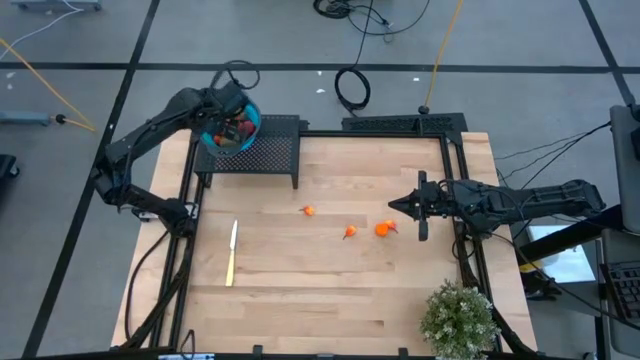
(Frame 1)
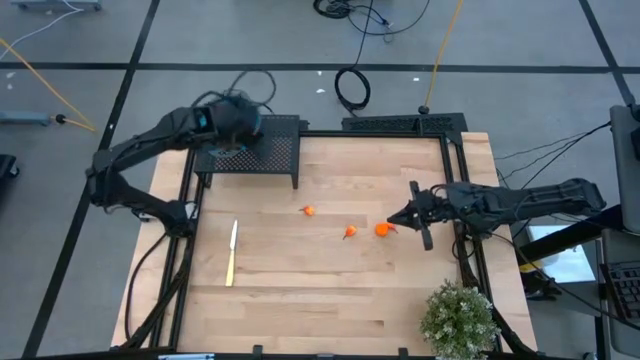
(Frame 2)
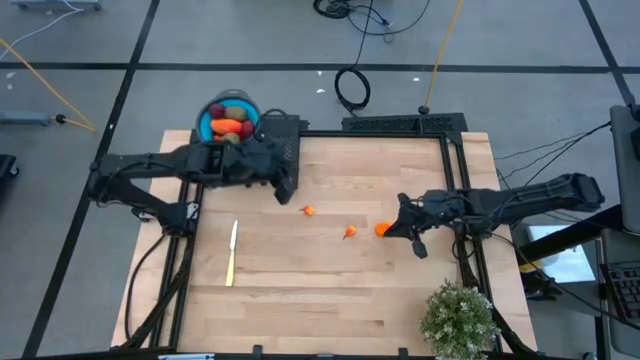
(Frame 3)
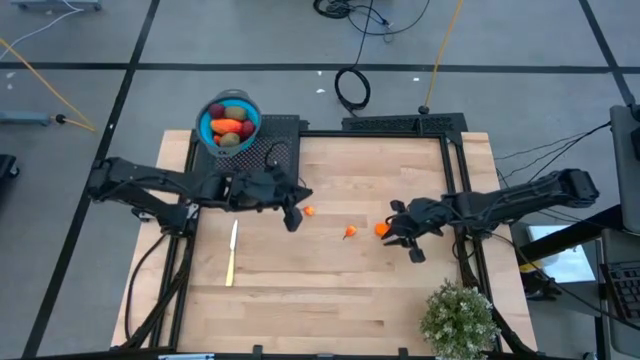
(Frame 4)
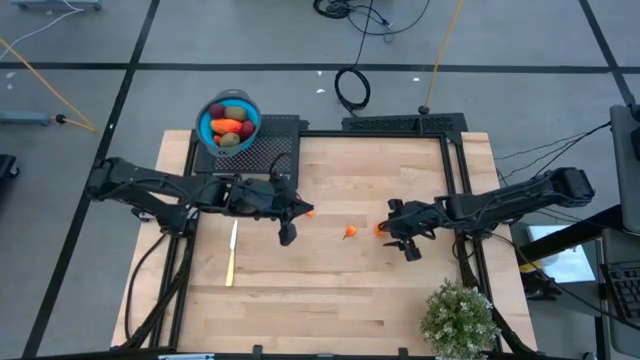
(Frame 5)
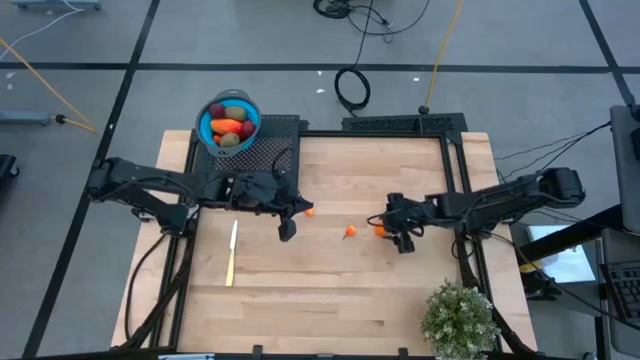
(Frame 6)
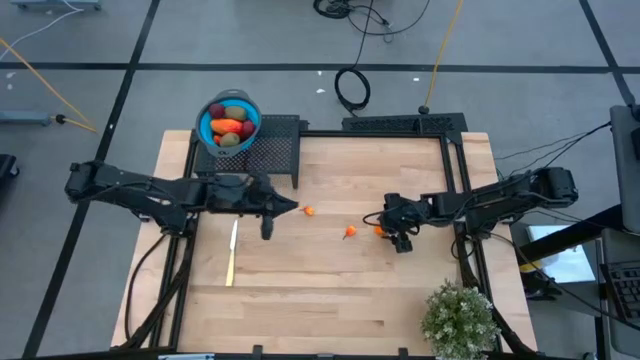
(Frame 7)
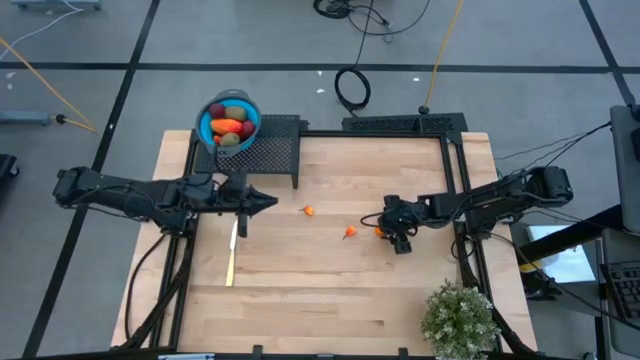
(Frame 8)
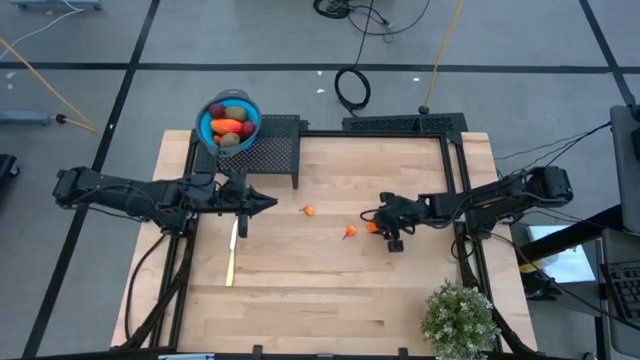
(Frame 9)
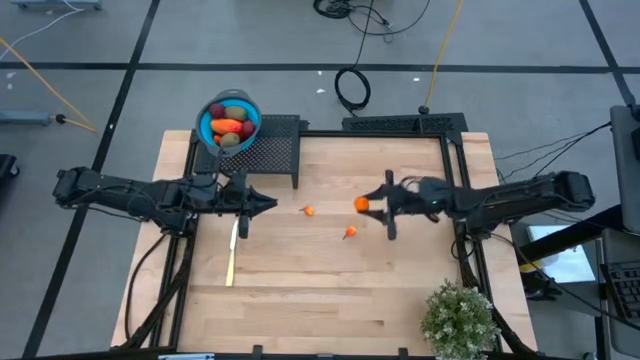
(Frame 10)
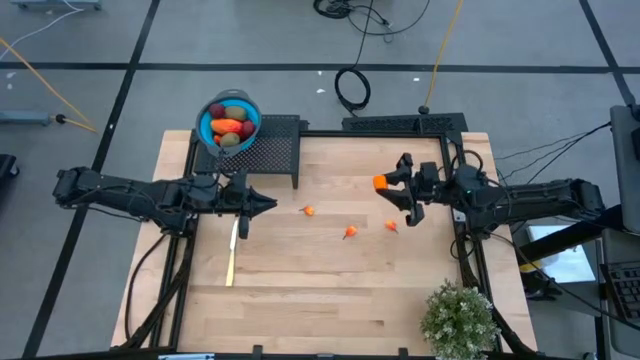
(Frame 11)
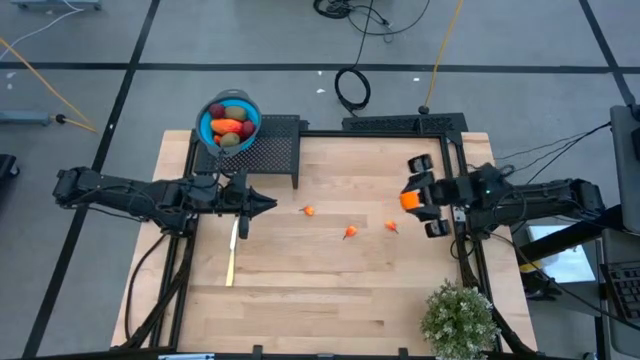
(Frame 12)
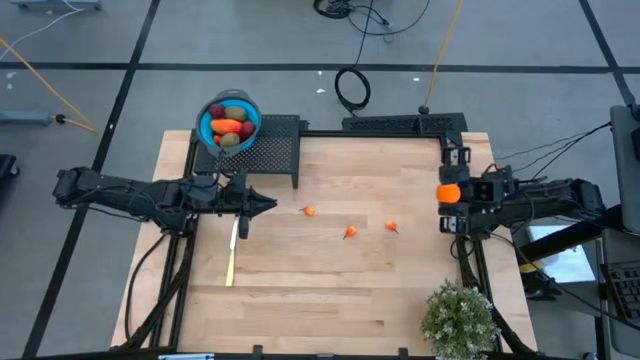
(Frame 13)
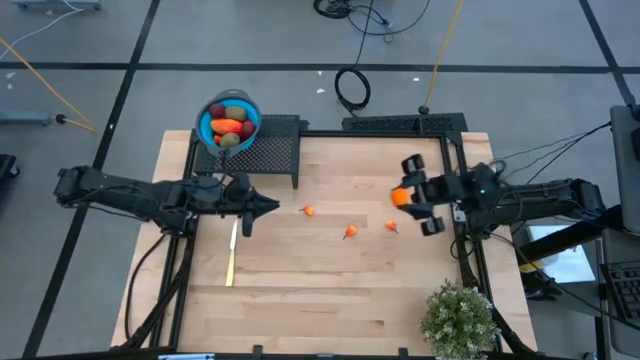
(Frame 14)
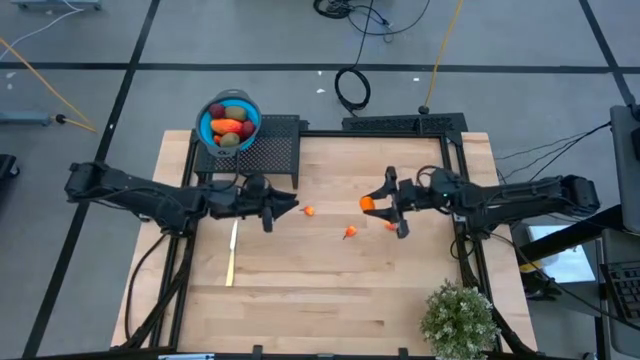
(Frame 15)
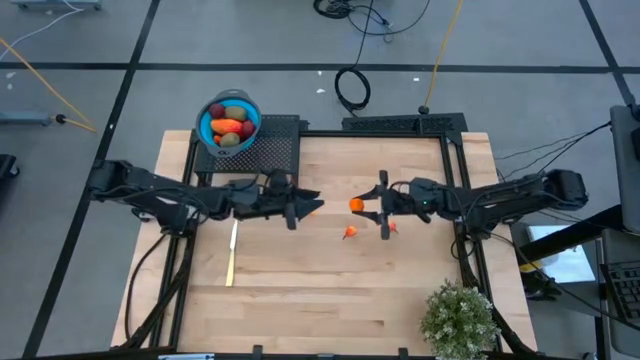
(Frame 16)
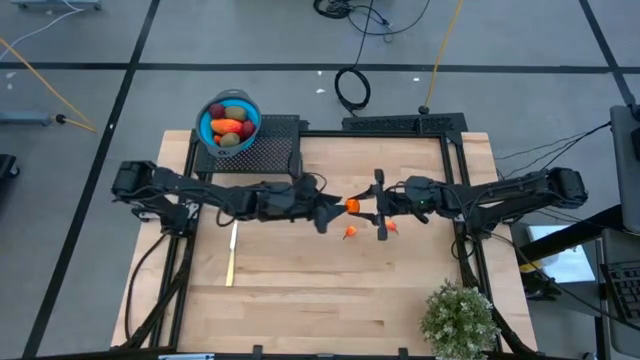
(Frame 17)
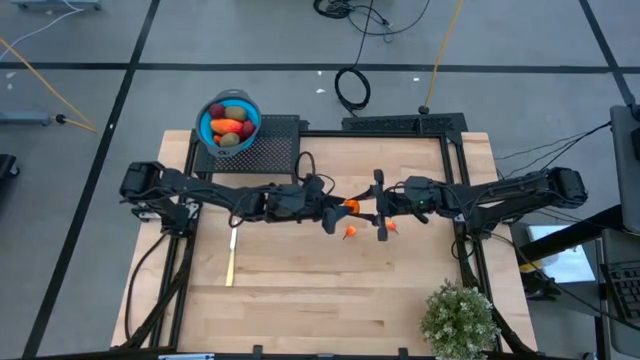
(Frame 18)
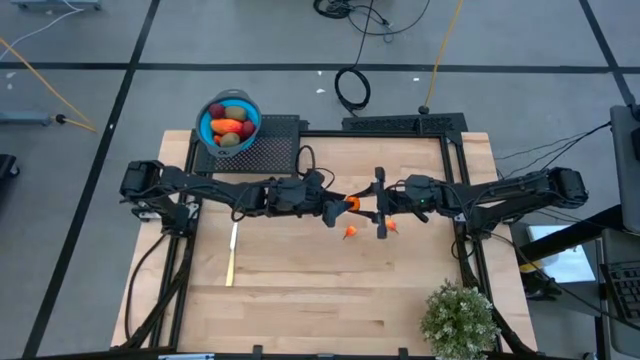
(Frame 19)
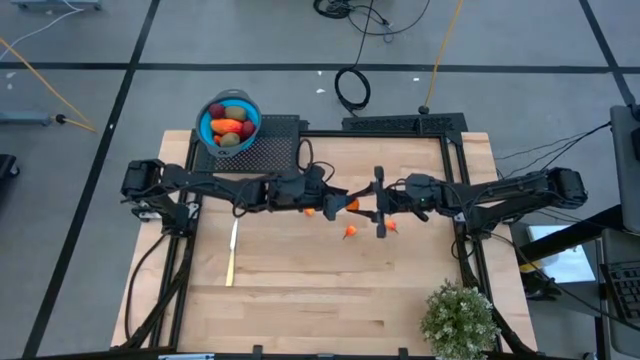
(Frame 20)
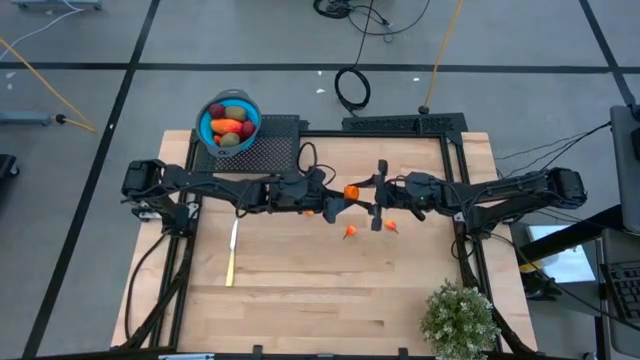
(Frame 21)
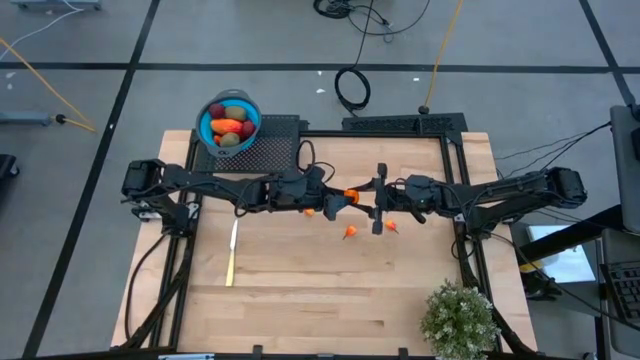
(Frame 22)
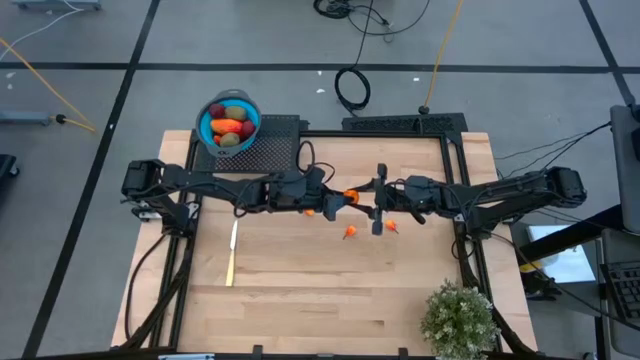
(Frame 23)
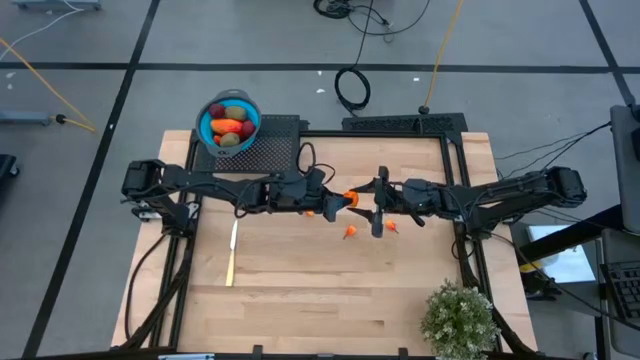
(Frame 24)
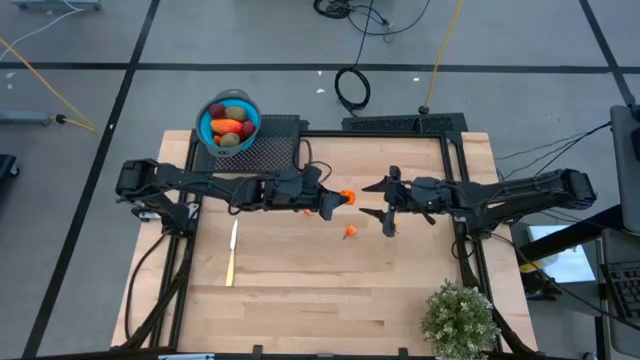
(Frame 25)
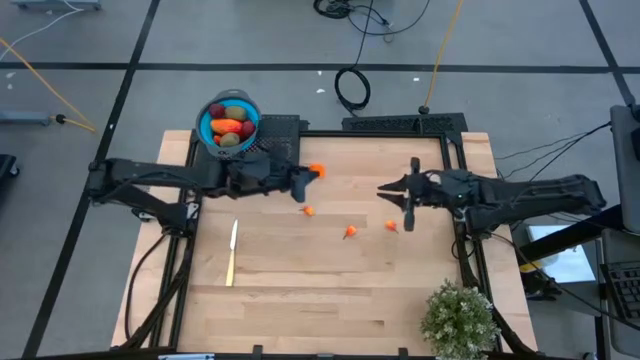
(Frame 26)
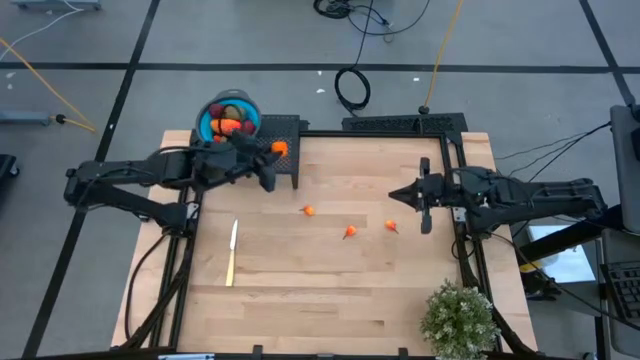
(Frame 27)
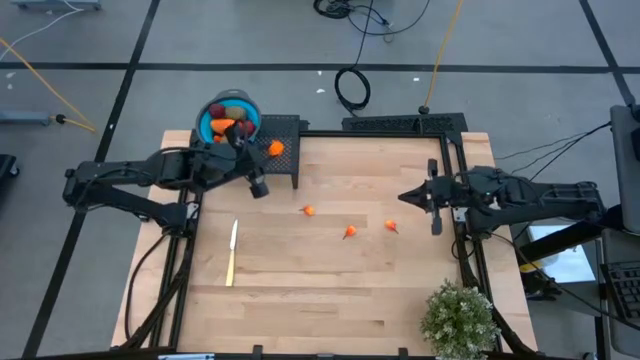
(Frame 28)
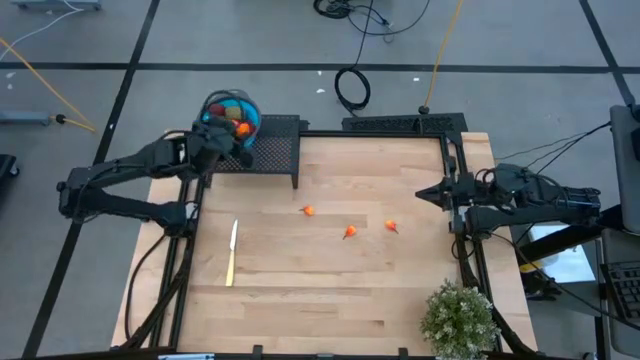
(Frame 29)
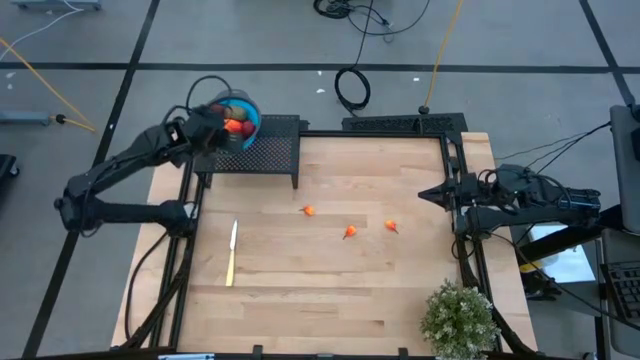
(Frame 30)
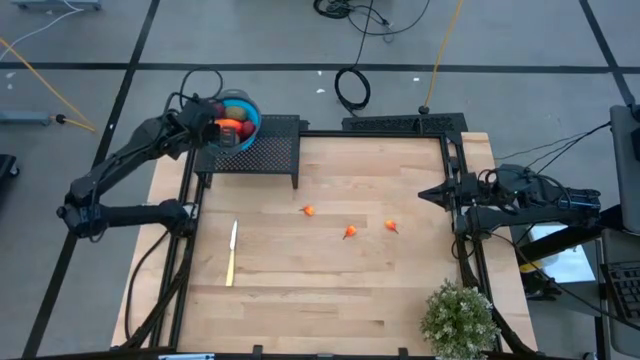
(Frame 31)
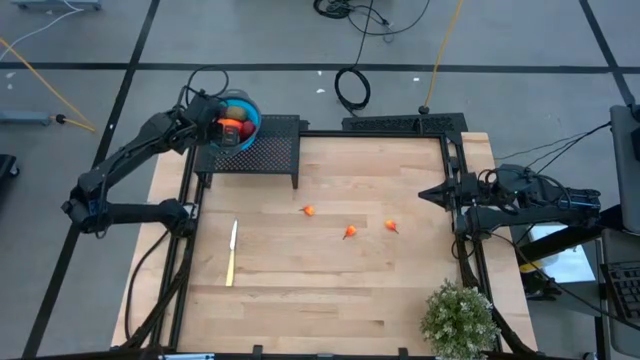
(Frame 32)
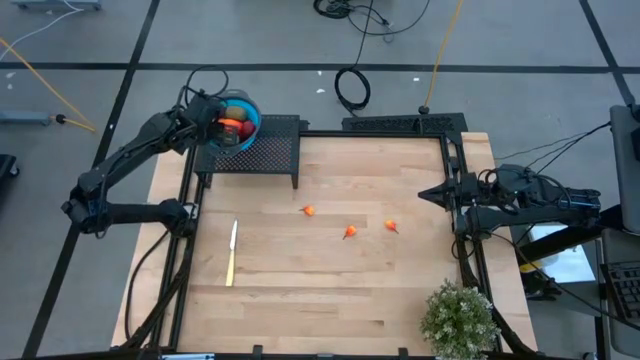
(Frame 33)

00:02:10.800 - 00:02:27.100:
Task: Pick & Place Fruit
Put the tangerine into the blue strainer bowl on the shelf
